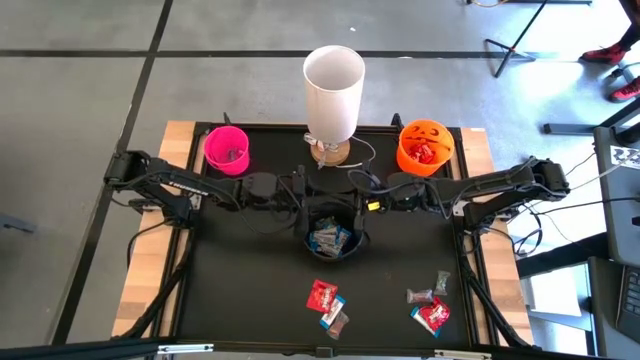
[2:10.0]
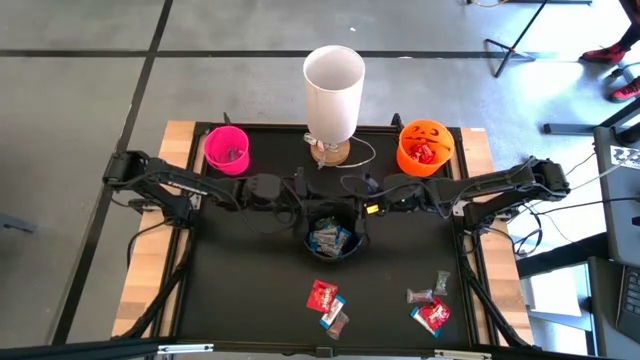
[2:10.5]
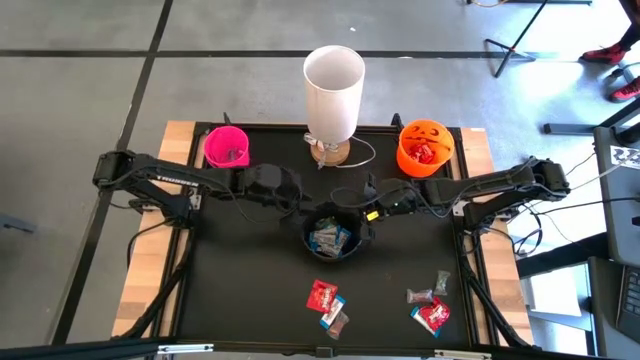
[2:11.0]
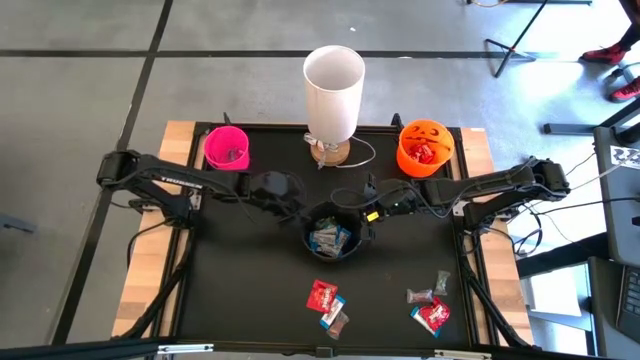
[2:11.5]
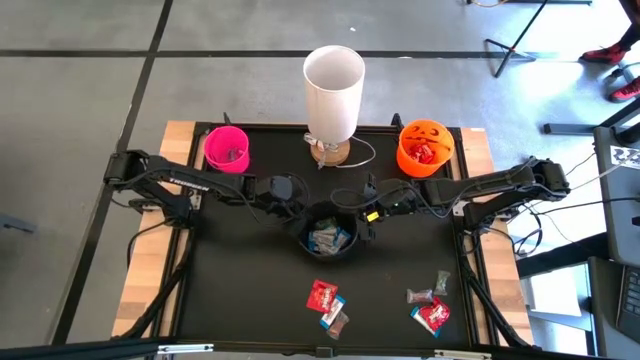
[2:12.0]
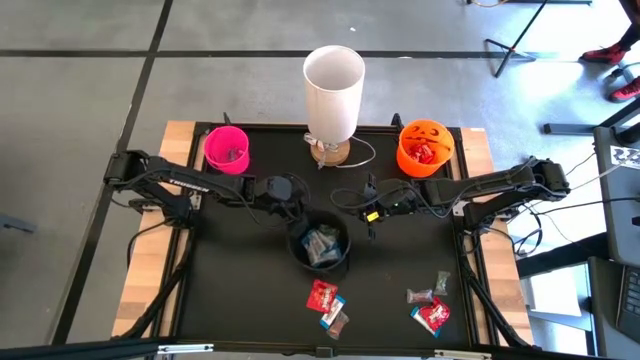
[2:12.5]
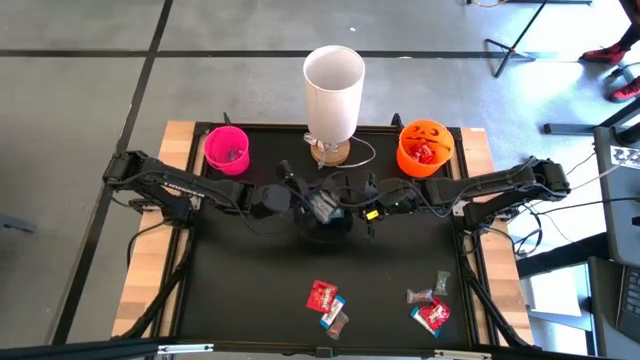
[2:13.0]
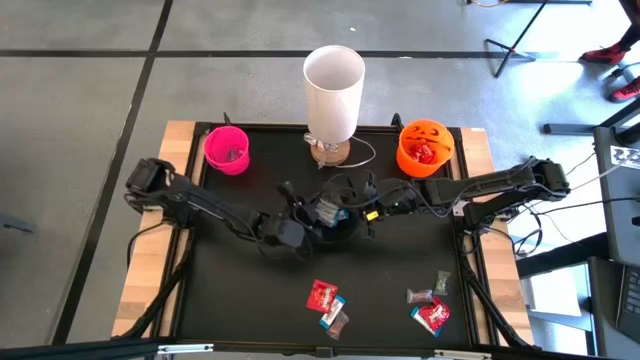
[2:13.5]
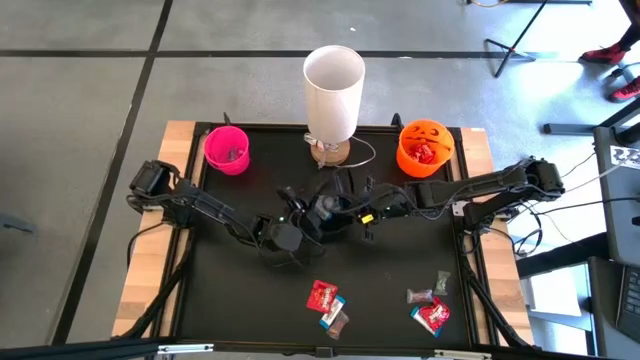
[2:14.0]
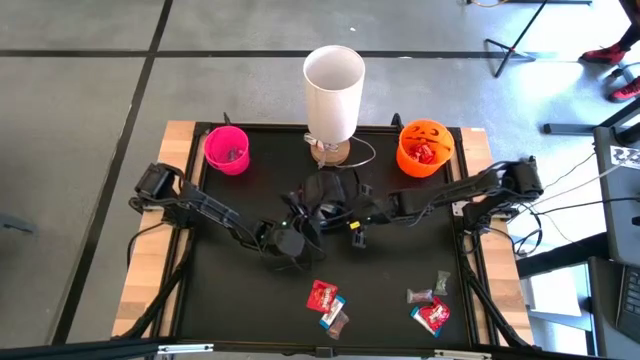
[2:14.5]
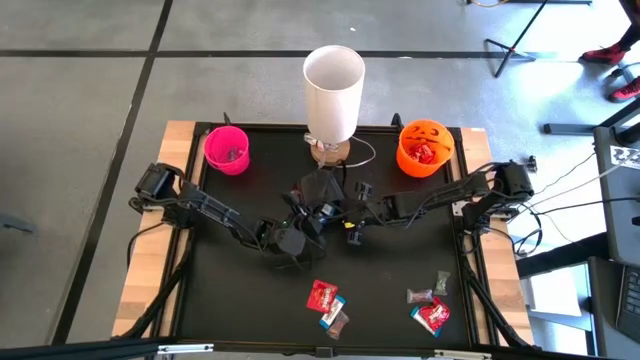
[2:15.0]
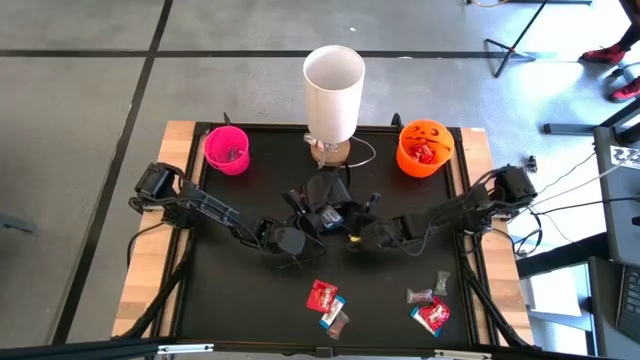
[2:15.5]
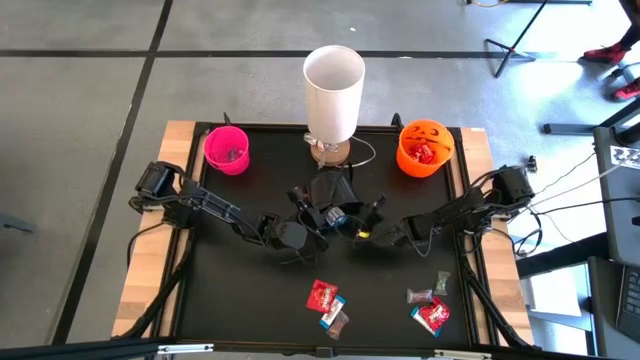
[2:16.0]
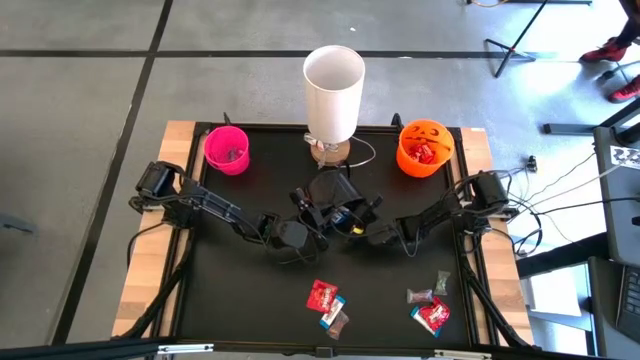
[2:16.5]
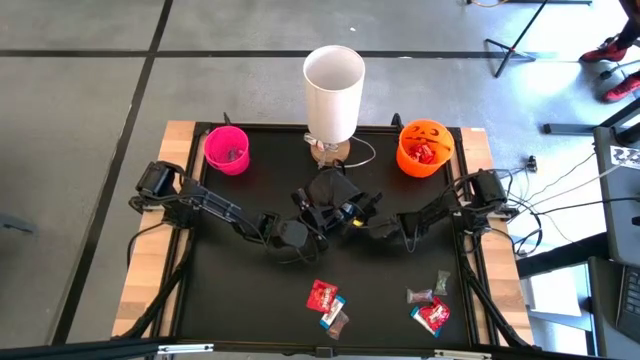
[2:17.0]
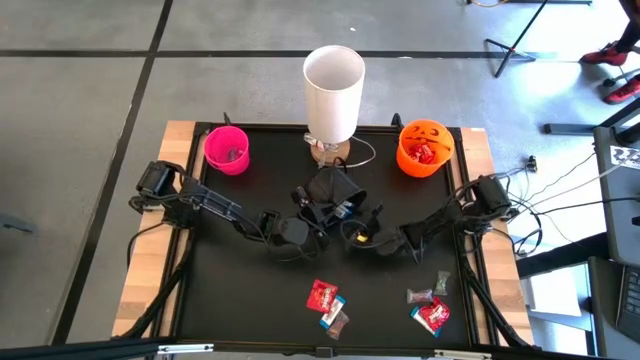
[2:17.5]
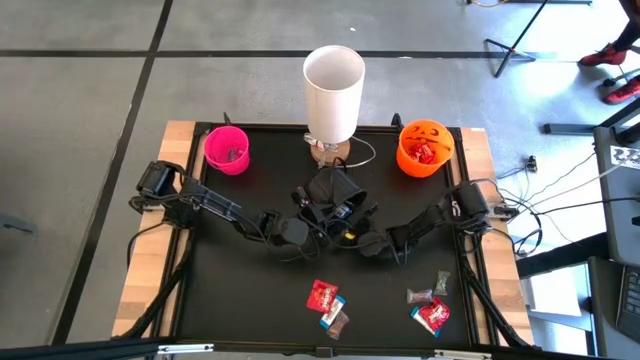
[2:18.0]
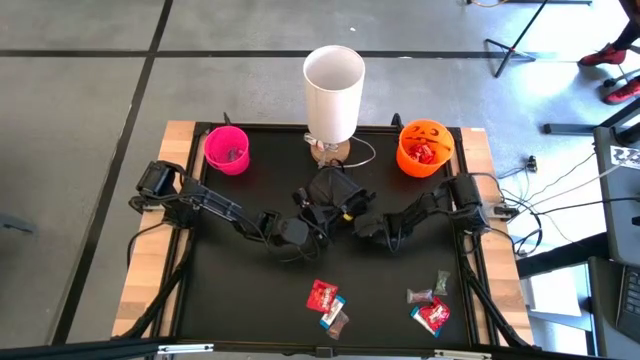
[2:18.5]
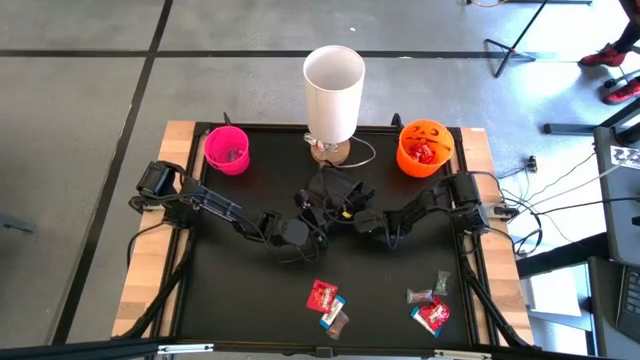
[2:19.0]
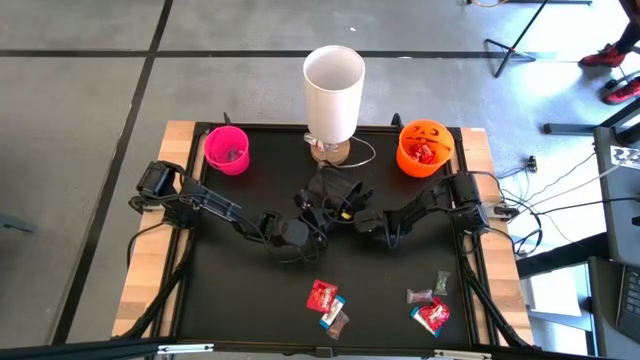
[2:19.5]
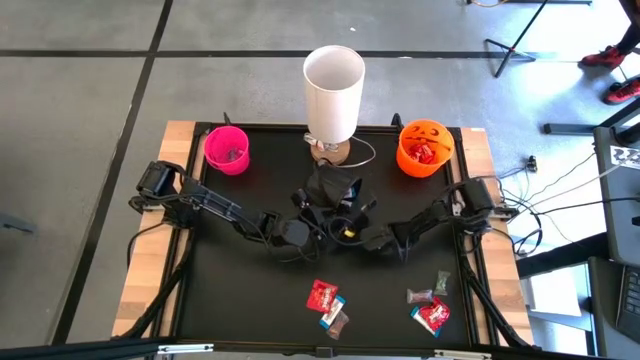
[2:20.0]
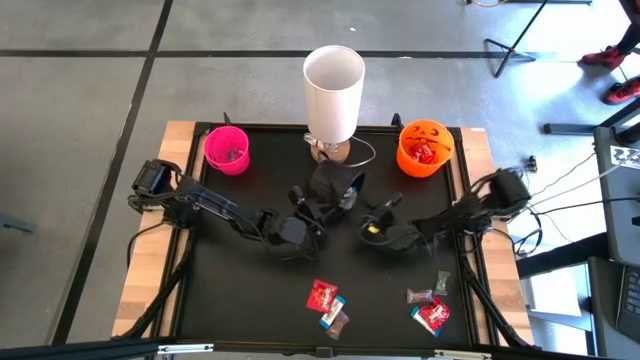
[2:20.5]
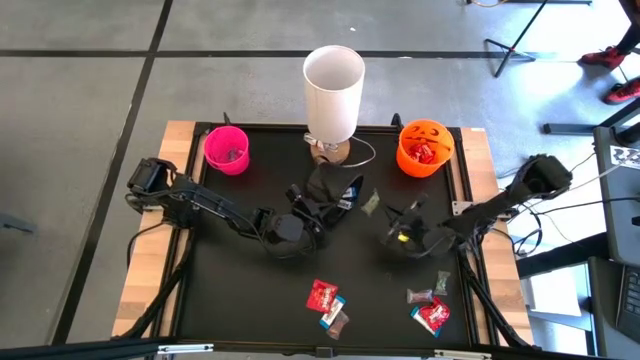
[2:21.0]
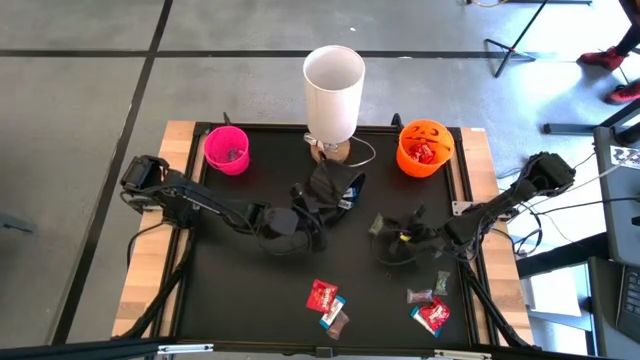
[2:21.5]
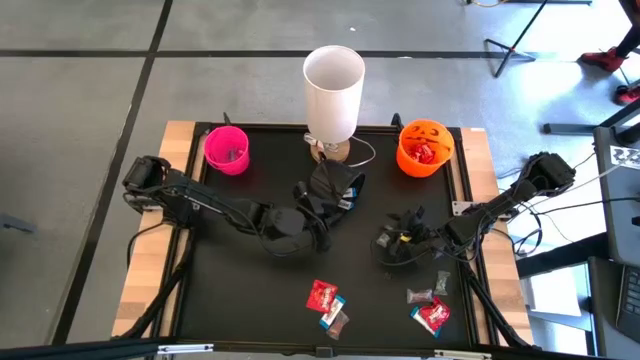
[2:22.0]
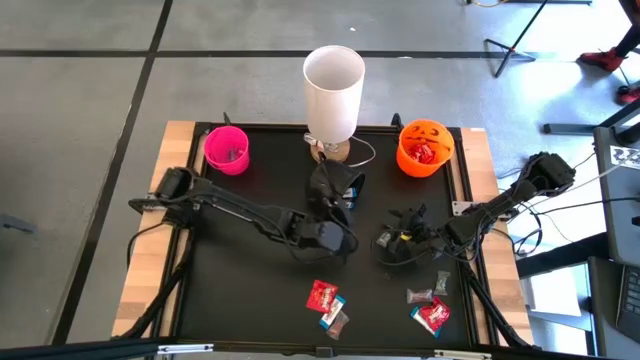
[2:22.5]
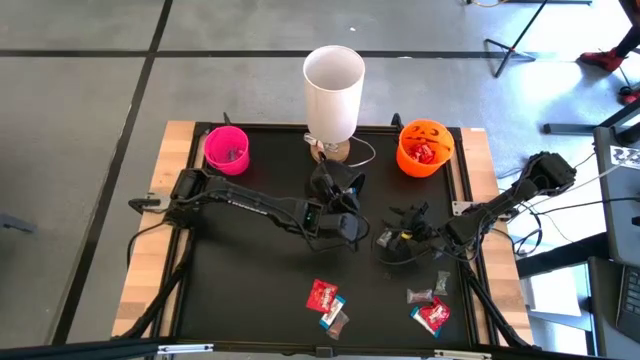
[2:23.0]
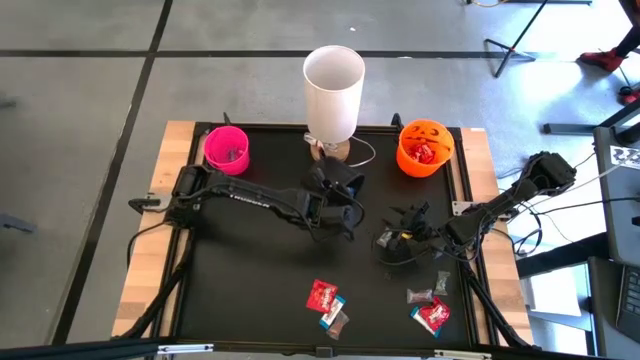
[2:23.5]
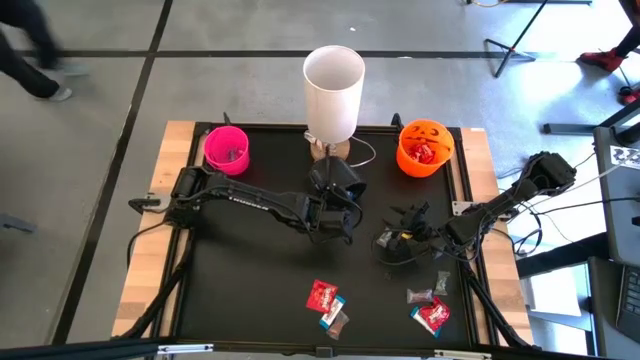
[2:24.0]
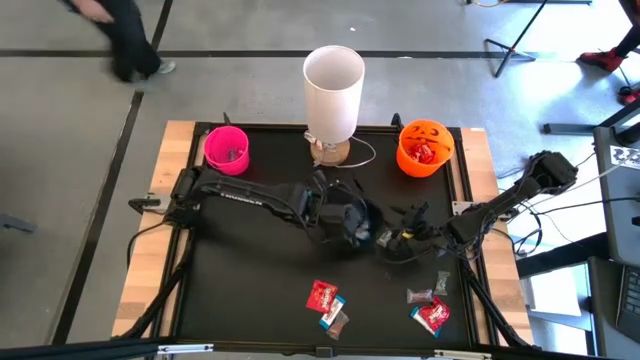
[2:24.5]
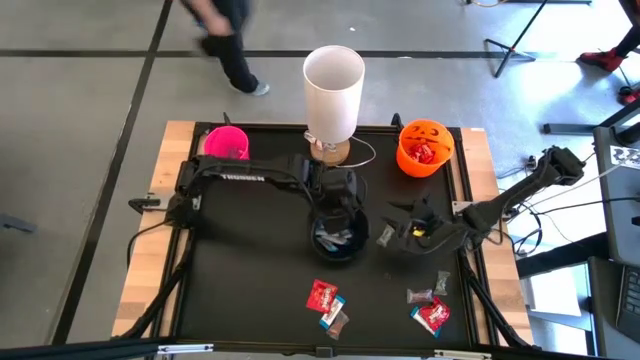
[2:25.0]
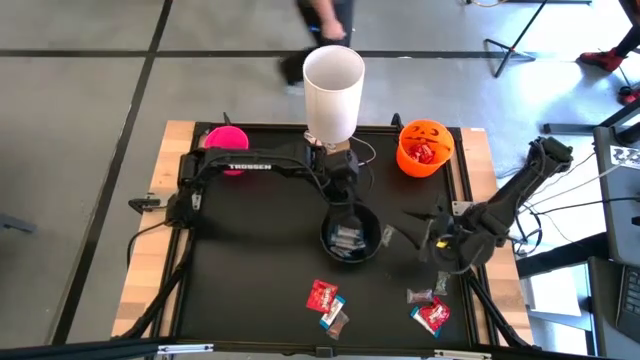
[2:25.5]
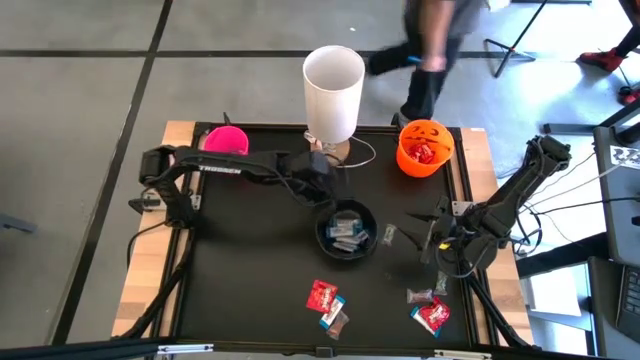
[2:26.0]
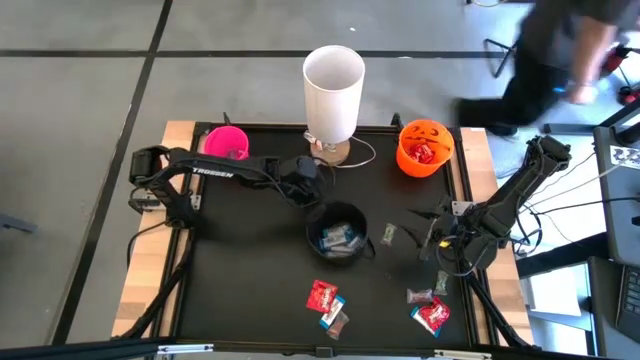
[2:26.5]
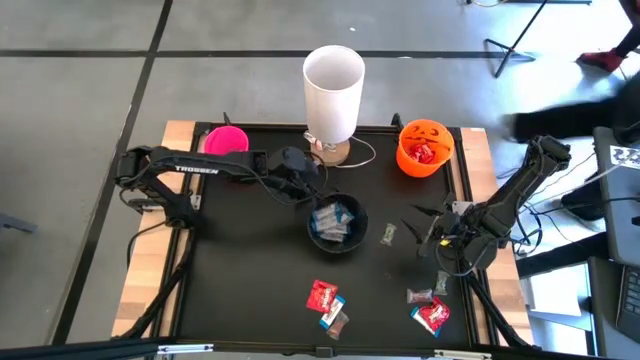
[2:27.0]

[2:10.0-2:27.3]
Task: Sort candy
Remove the green gummy from the black bucket

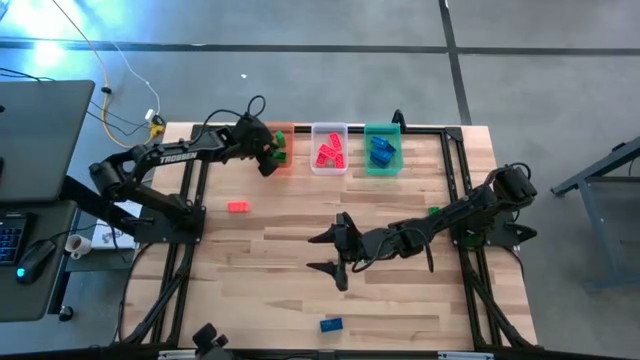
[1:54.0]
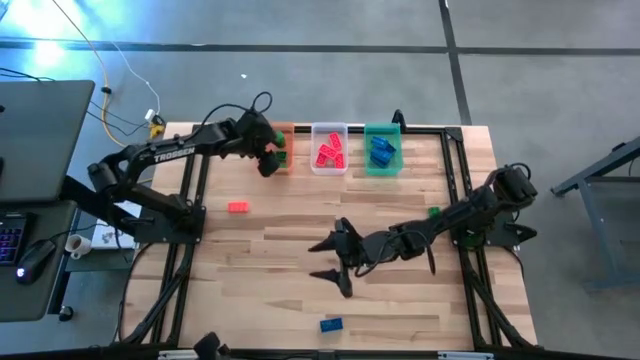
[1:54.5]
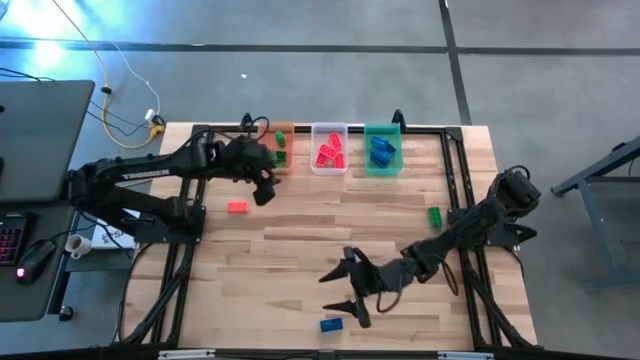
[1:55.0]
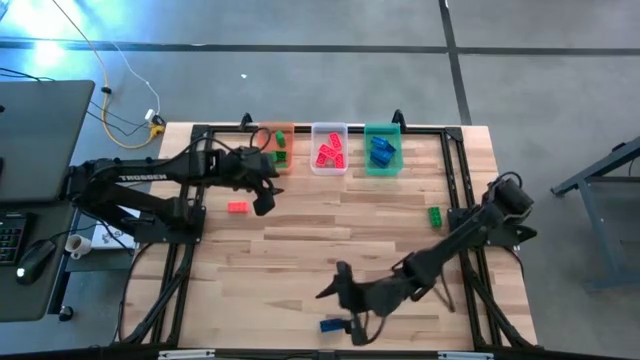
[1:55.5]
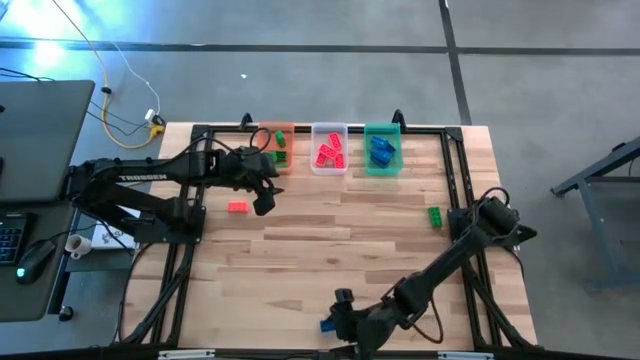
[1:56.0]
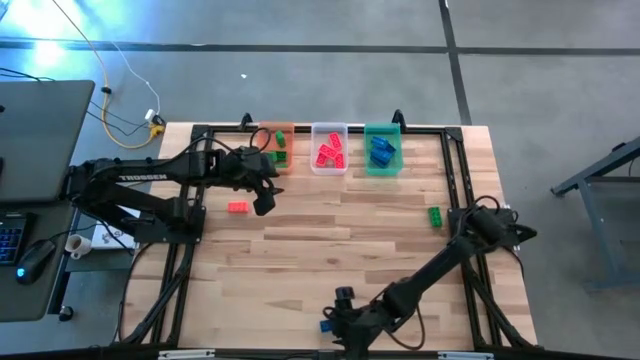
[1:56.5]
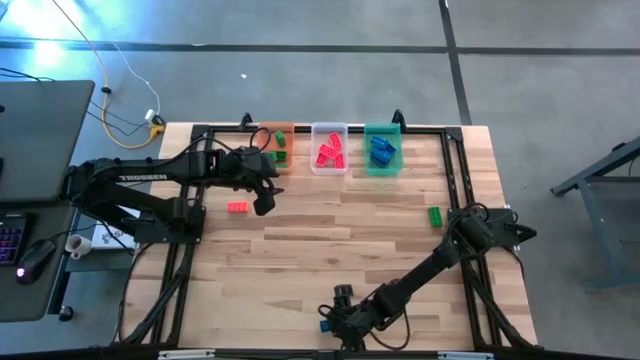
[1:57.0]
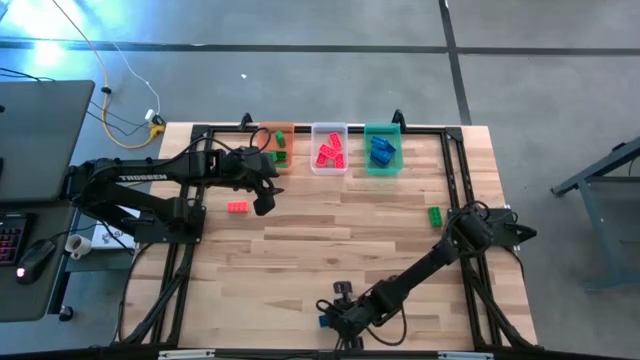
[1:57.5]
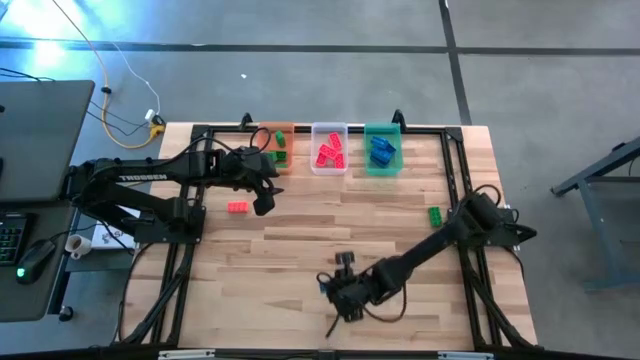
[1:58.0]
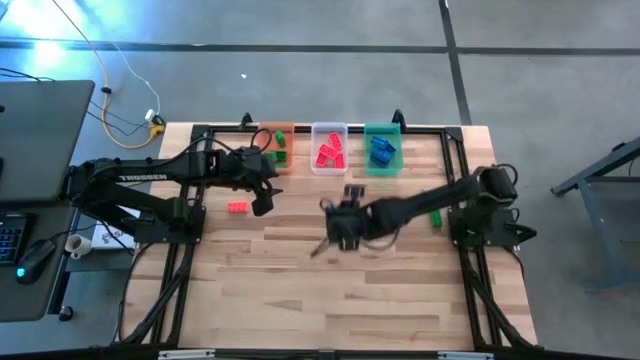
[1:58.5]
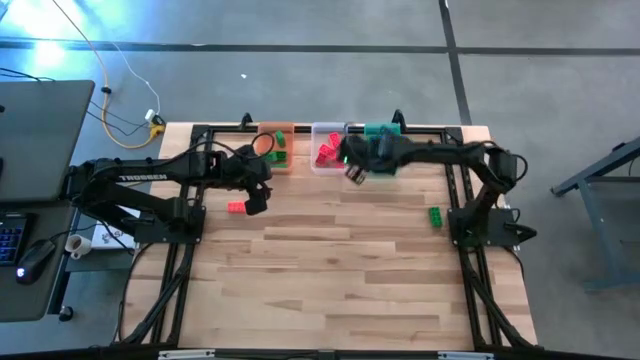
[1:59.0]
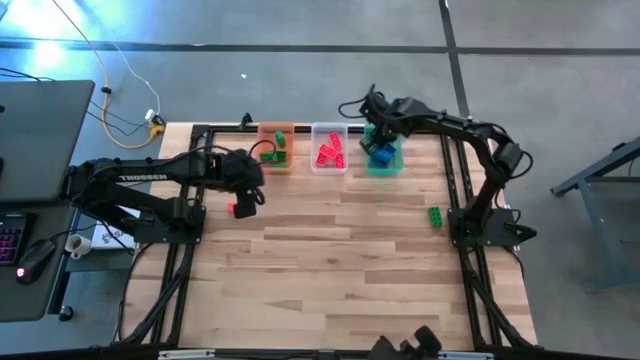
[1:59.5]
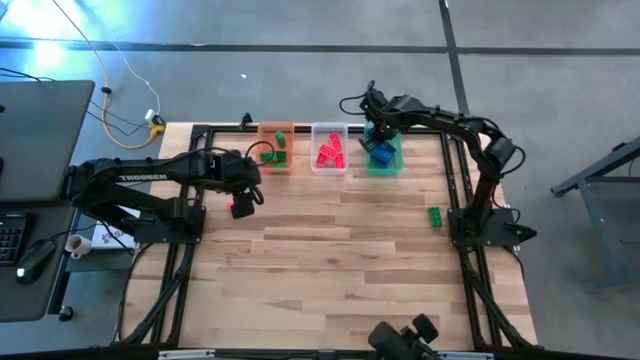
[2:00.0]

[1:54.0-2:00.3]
Task: Sort & place blocks by color
Put the blue game piece into the green bin
